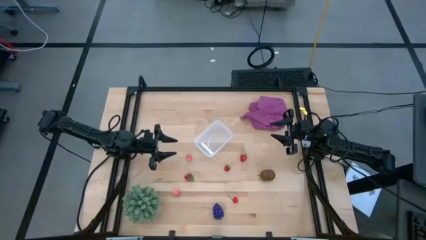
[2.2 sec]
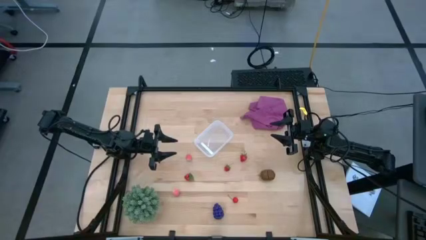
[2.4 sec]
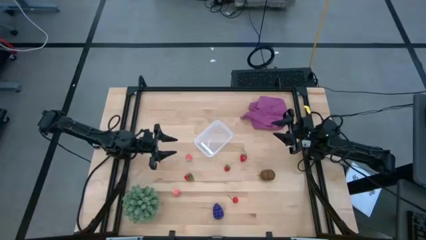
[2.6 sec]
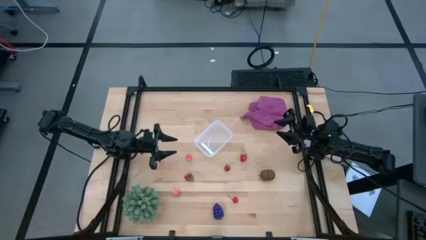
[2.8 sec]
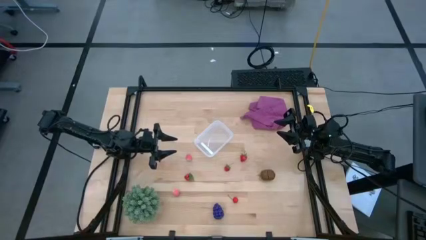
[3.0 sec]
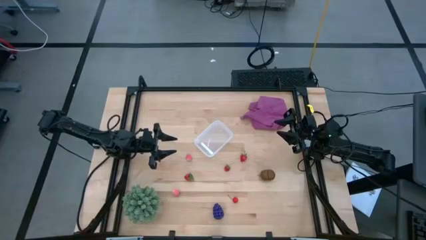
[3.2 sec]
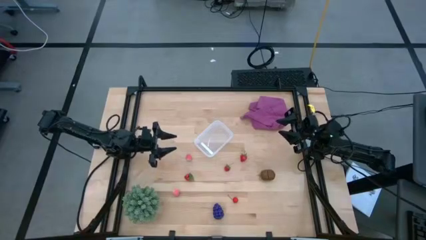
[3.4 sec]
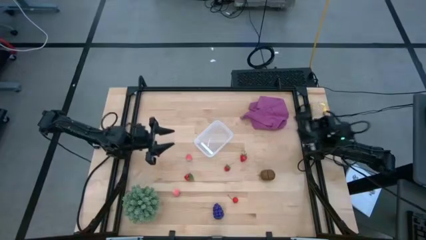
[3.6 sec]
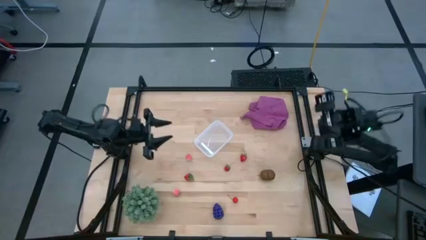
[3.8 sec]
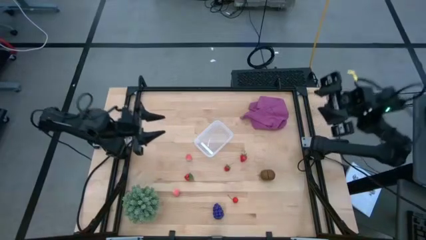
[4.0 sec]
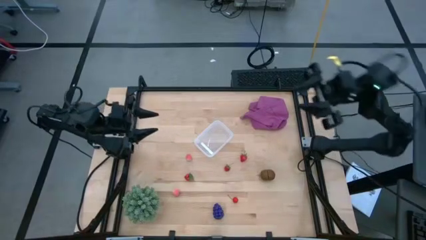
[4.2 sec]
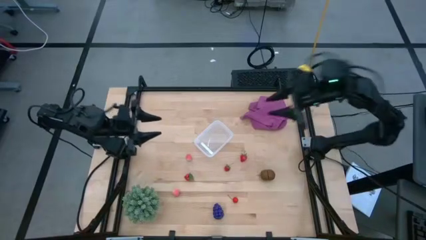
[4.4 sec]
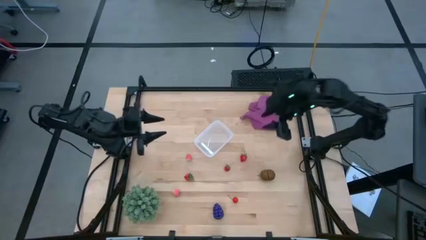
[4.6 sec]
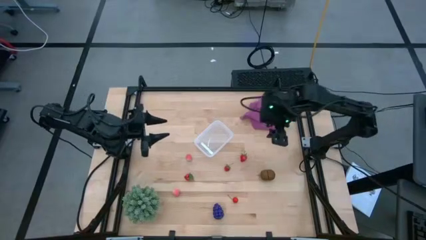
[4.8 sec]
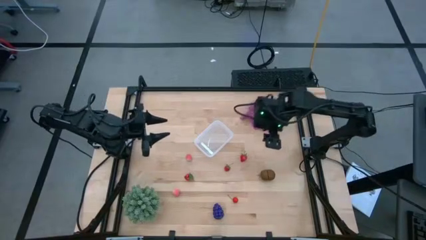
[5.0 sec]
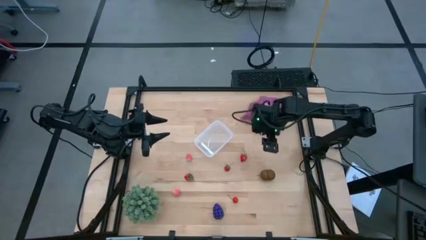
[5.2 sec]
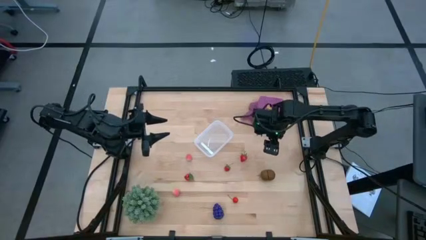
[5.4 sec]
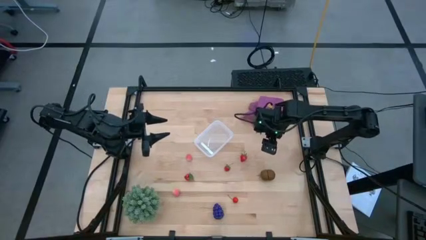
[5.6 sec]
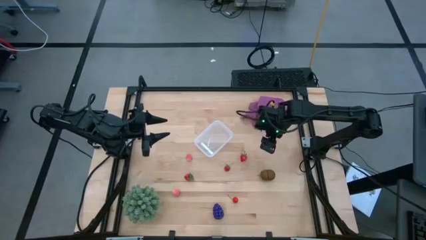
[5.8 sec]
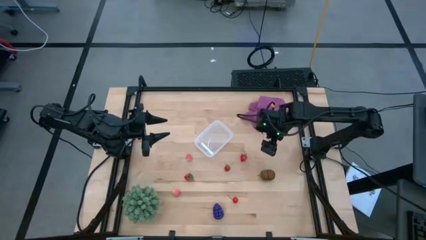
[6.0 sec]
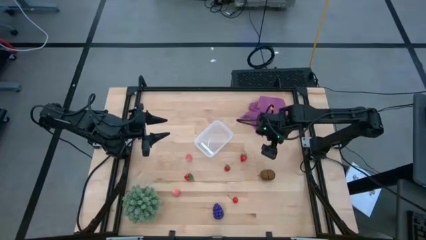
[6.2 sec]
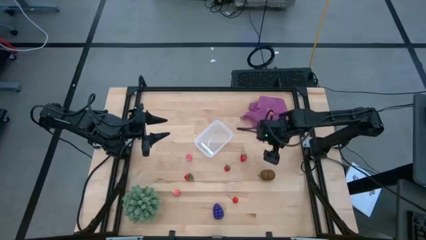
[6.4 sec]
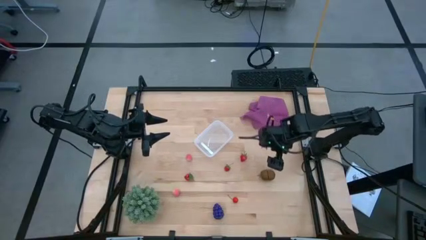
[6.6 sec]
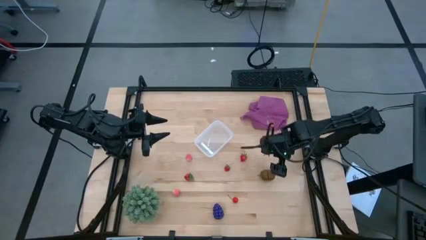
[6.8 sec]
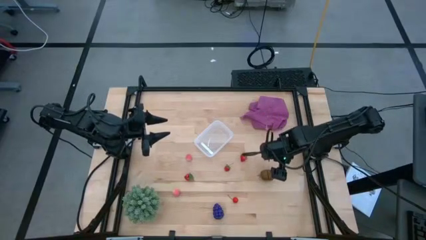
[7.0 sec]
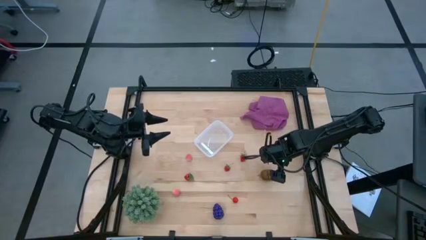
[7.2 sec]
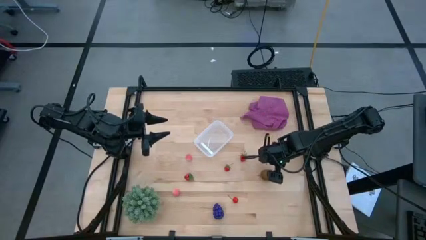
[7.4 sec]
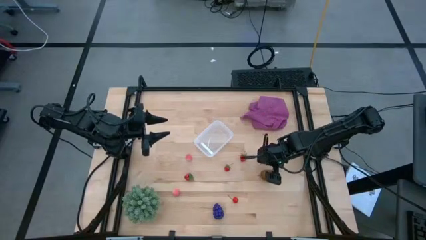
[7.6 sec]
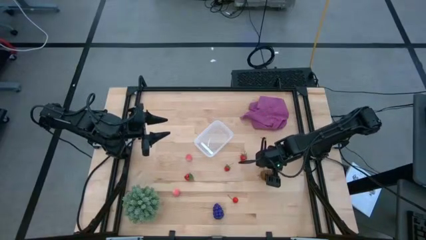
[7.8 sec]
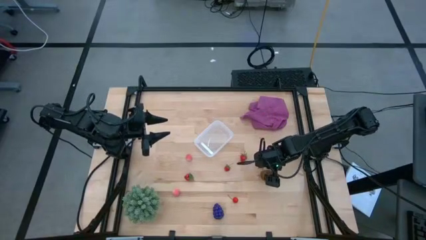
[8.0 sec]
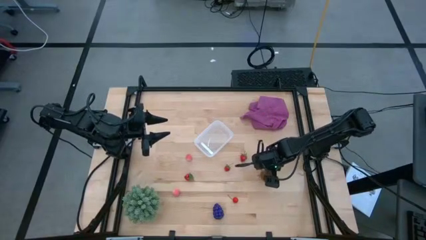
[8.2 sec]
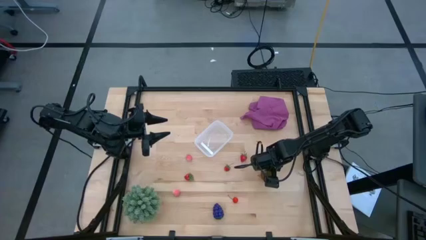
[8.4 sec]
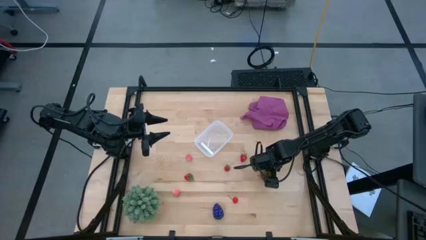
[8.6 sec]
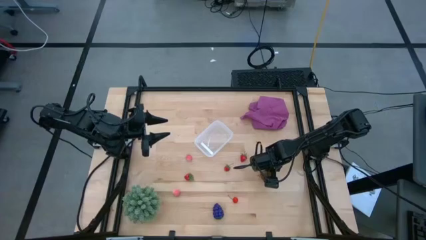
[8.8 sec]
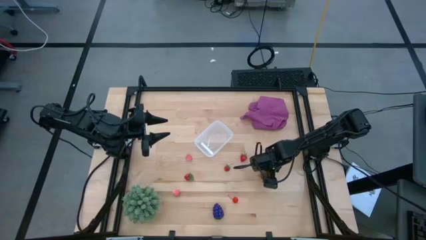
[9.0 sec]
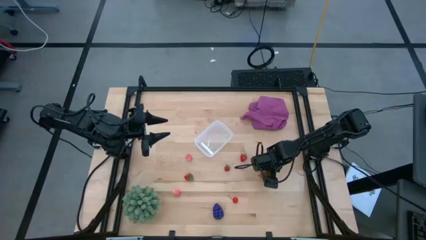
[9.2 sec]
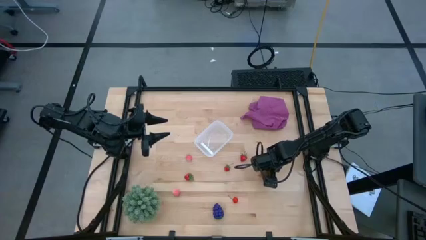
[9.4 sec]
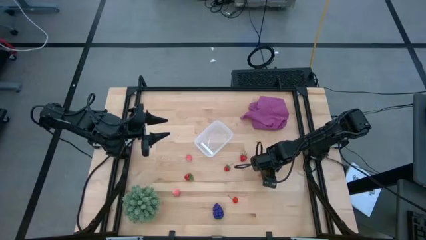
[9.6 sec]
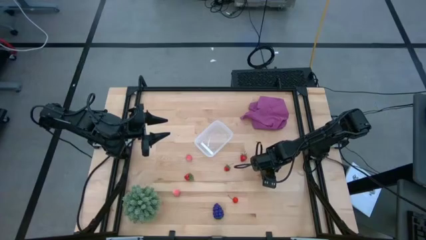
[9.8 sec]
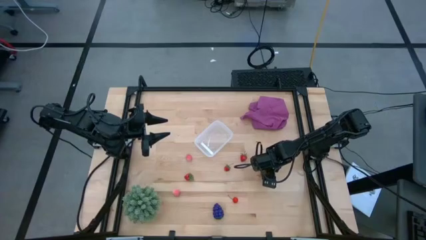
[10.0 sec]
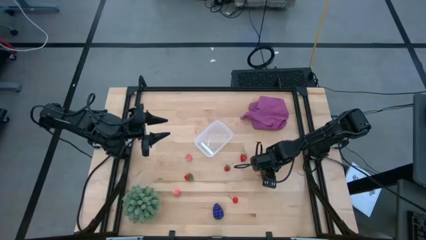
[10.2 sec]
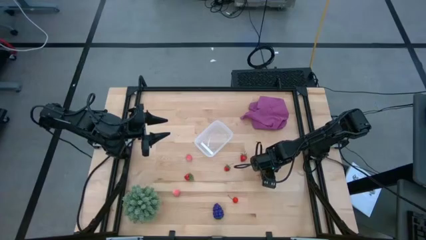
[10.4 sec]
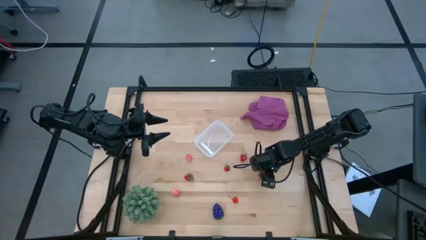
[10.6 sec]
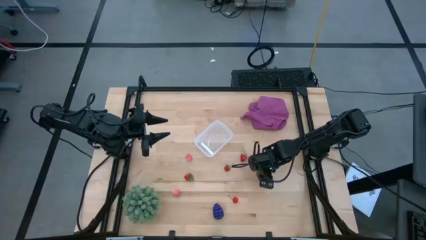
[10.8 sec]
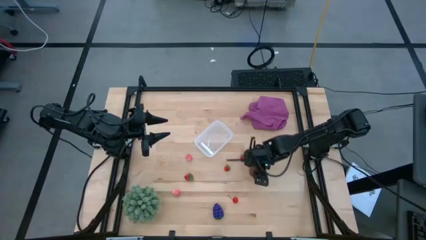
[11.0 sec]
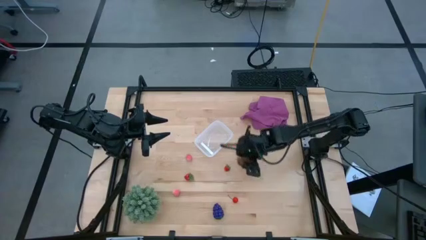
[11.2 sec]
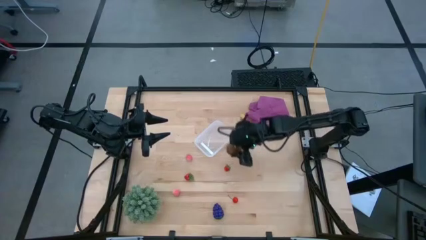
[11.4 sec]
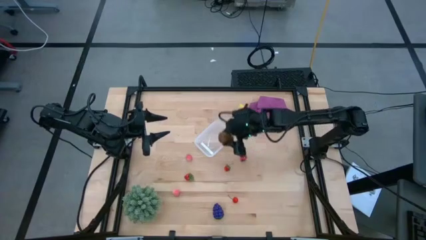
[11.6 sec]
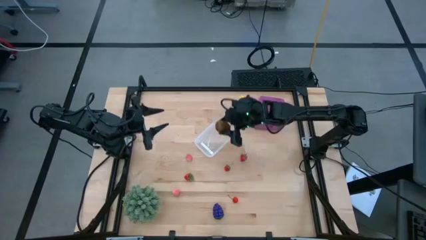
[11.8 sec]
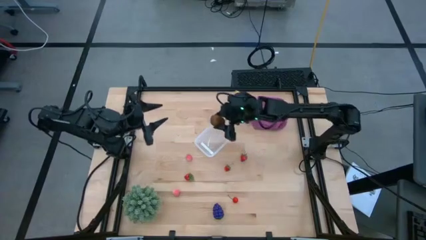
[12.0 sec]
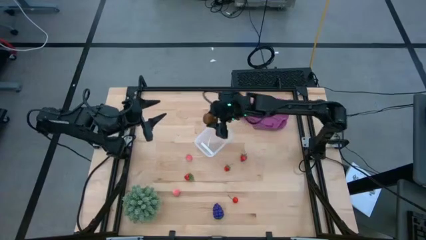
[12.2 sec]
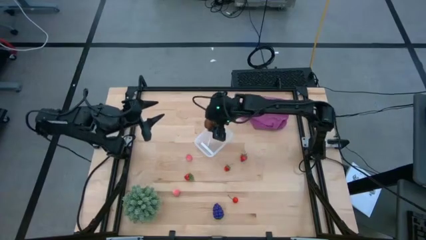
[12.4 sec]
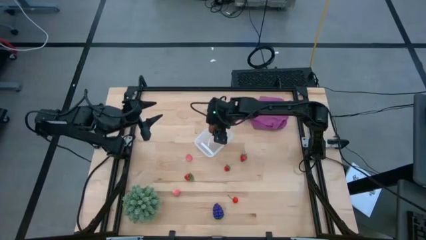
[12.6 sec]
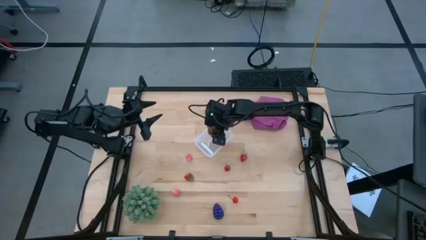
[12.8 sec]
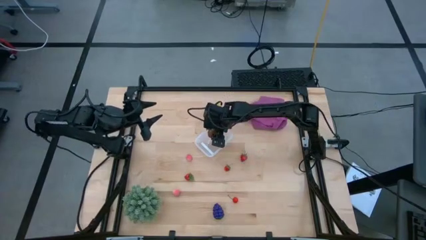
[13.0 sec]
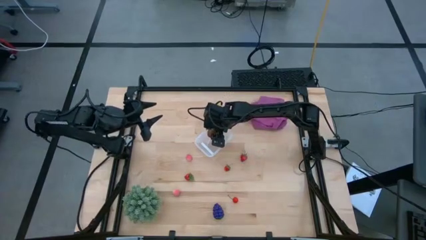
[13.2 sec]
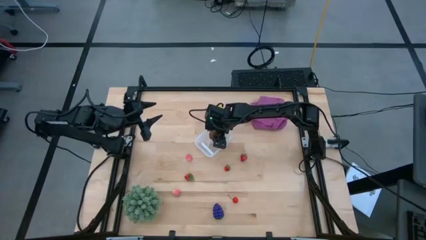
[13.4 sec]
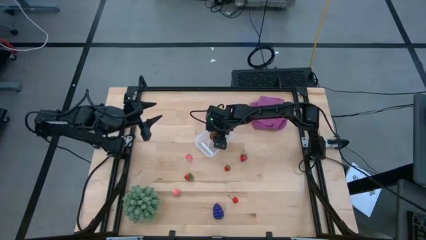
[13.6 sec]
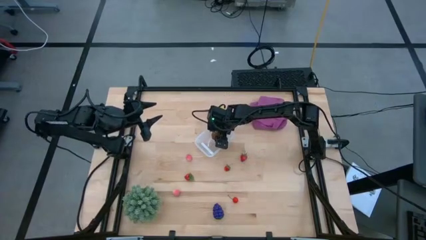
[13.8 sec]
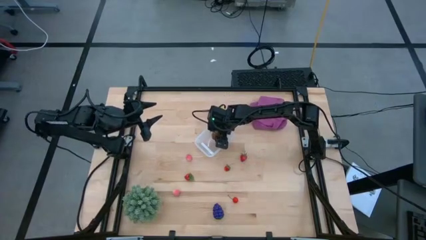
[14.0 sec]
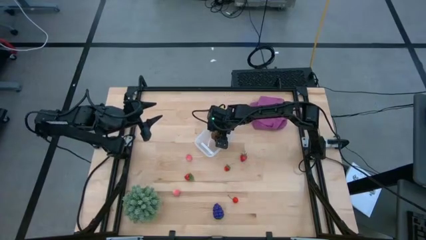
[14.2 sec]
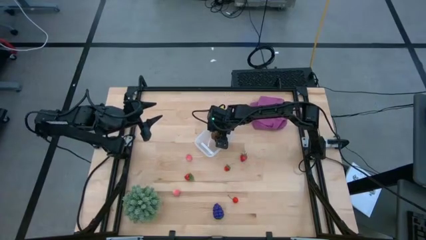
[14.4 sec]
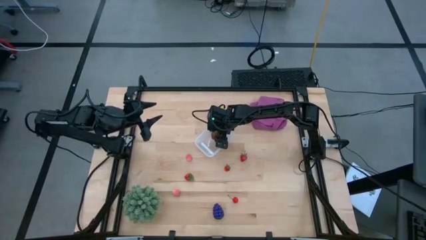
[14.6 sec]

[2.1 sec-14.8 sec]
Task: Pick and placing Produce into tupperware
Put the kiwi into the transparent bin

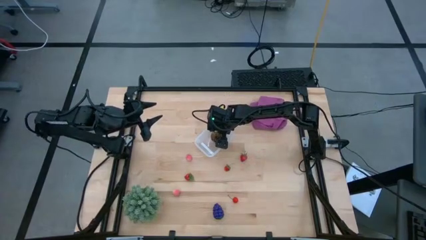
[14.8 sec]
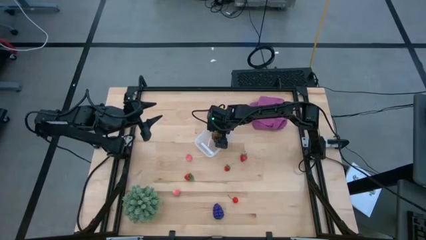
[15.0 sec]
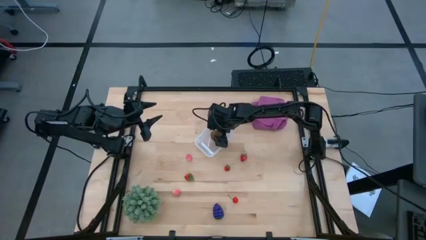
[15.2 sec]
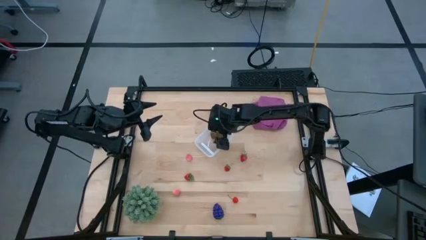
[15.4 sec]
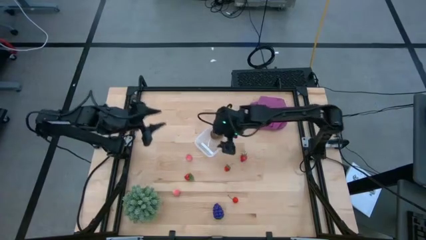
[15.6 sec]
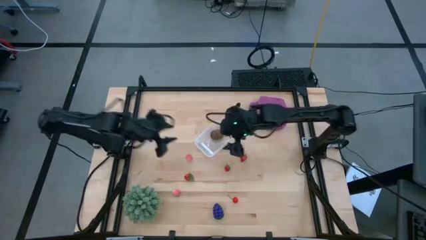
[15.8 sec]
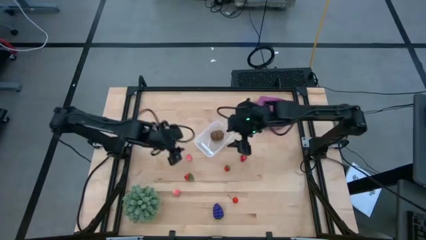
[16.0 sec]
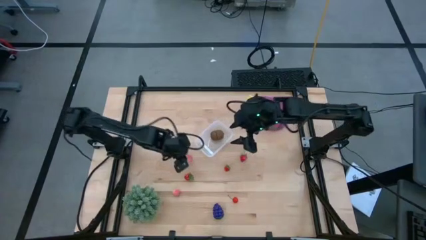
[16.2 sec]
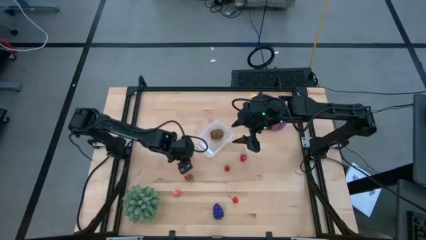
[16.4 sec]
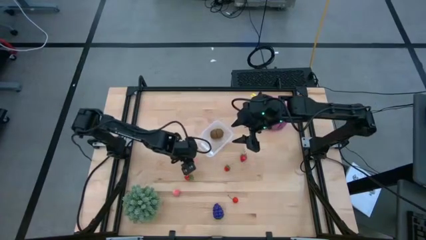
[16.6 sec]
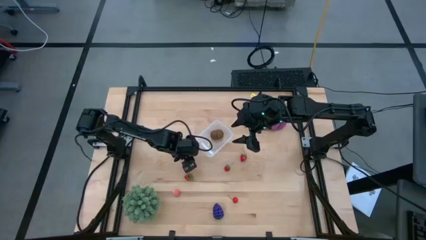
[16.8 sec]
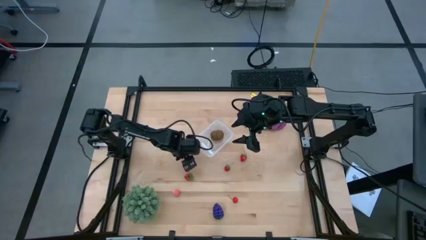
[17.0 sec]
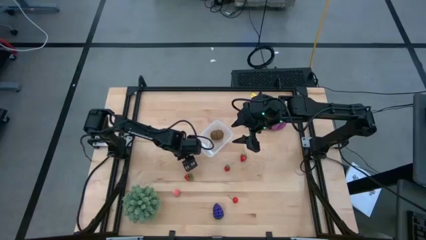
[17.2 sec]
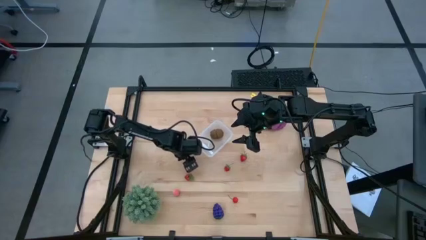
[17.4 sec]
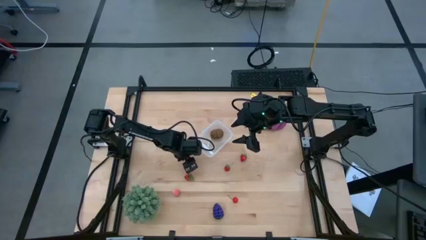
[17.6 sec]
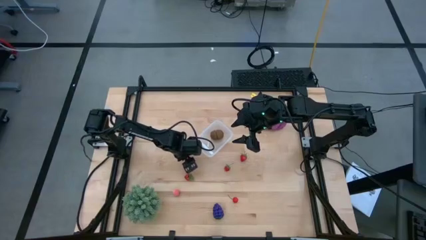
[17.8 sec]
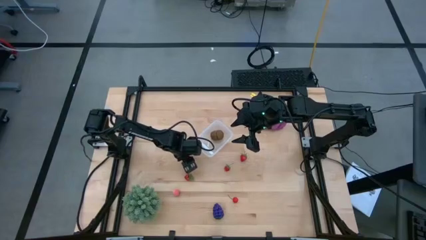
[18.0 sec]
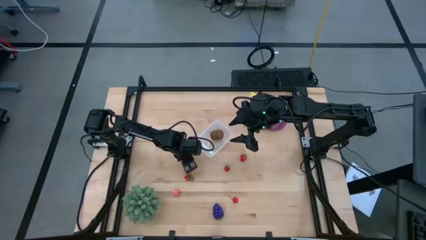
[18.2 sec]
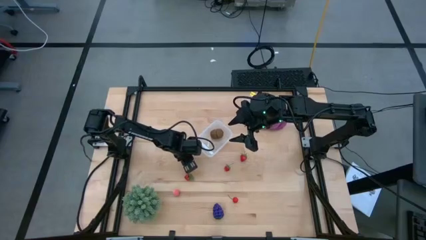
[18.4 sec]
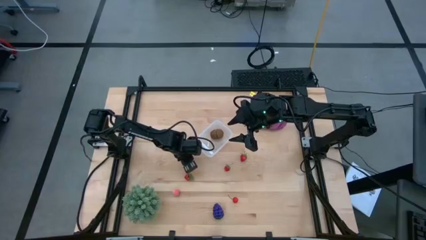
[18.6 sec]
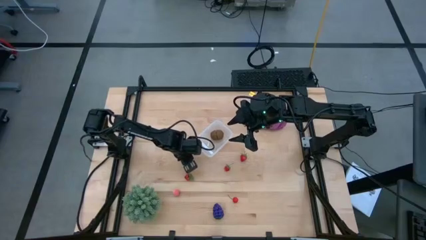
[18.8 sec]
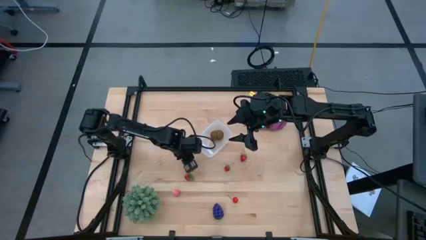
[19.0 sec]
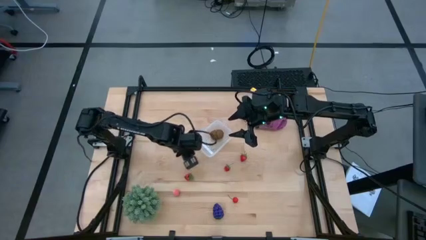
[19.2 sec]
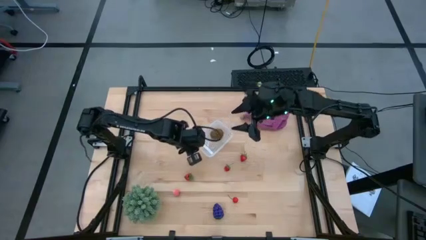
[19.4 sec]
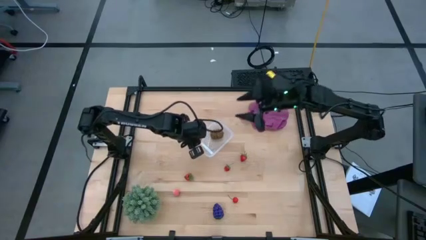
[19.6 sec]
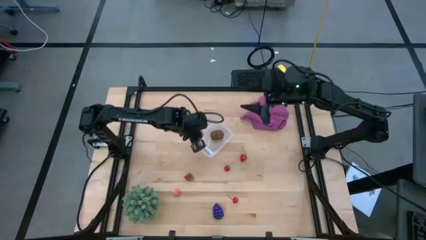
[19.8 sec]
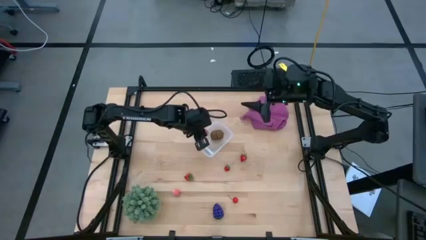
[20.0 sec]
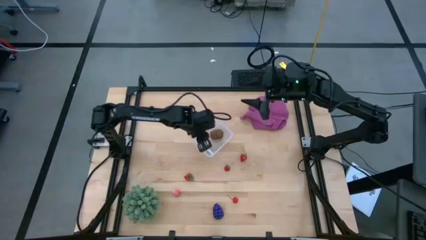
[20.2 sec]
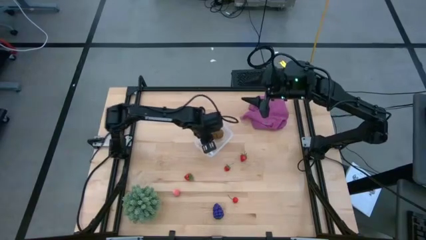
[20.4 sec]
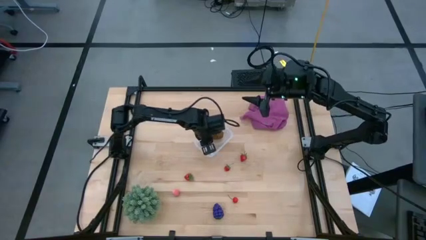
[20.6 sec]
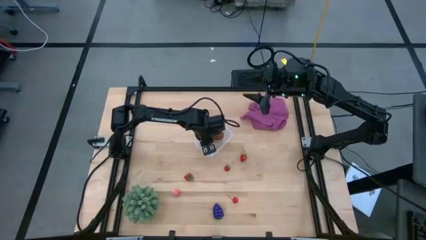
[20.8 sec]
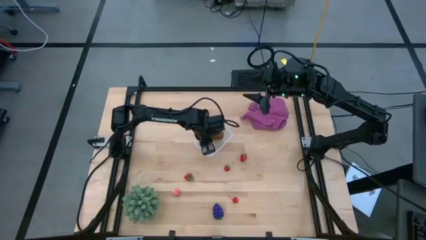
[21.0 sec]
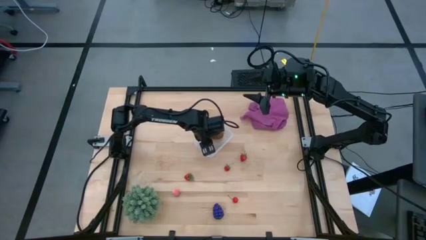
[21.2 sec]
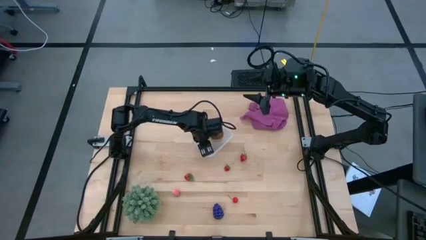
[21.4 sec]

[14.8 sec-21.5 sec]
Put the top peach into the transparent bin
